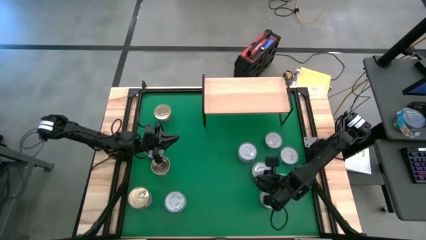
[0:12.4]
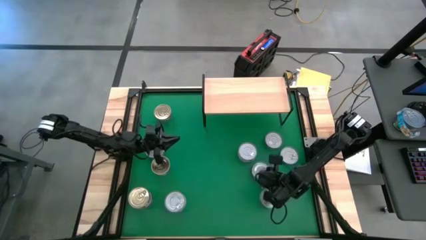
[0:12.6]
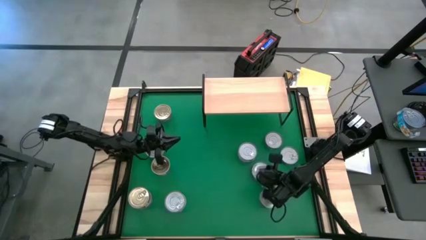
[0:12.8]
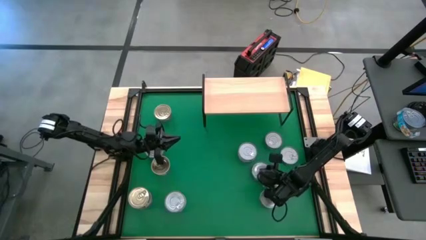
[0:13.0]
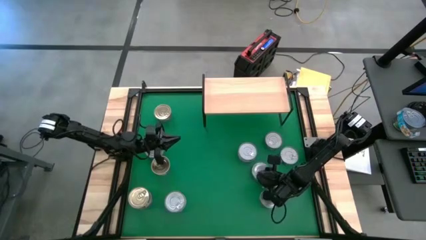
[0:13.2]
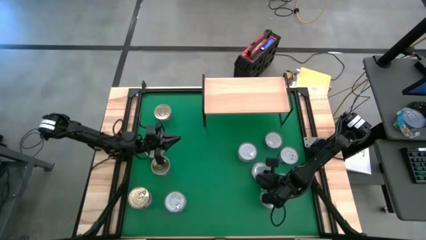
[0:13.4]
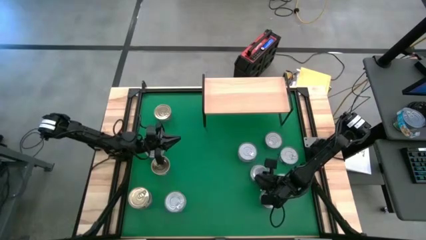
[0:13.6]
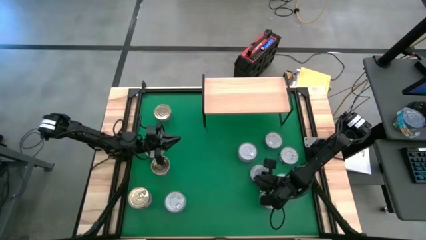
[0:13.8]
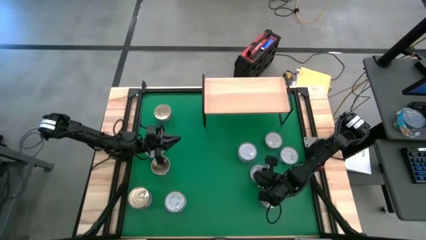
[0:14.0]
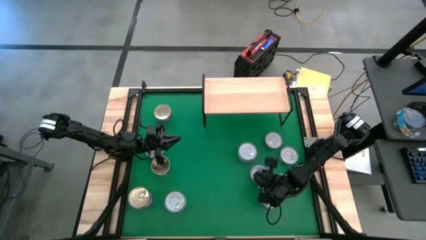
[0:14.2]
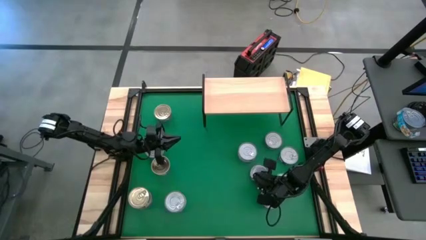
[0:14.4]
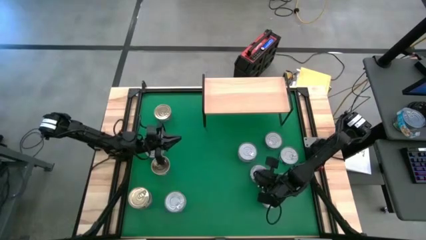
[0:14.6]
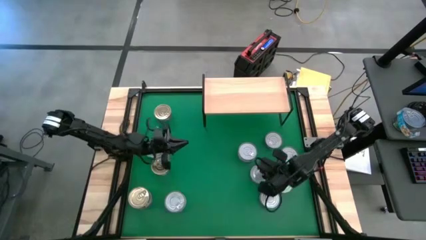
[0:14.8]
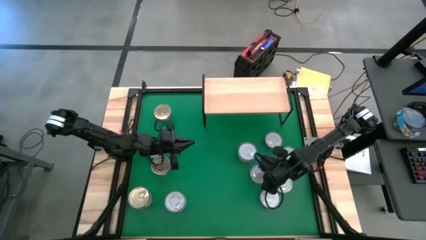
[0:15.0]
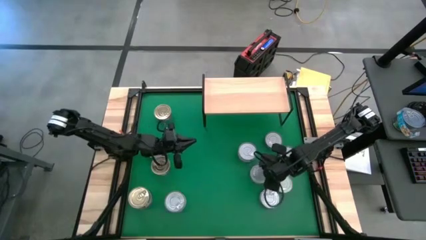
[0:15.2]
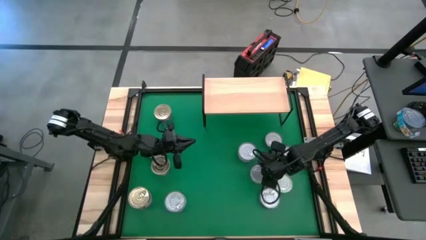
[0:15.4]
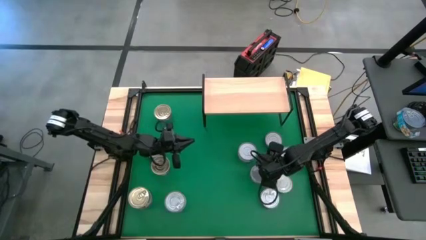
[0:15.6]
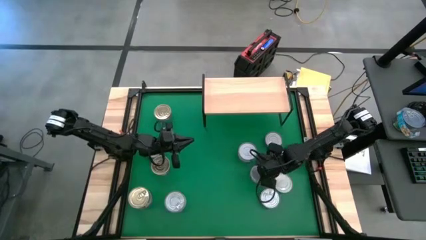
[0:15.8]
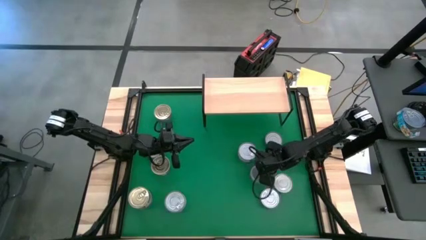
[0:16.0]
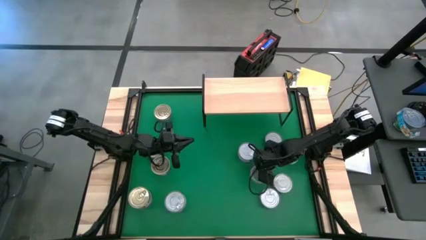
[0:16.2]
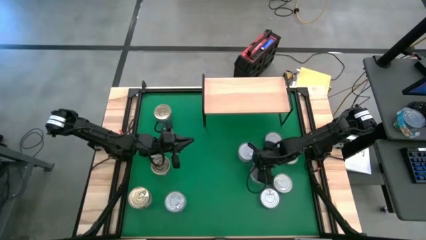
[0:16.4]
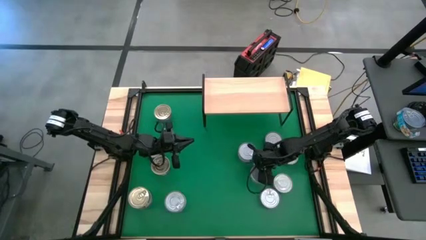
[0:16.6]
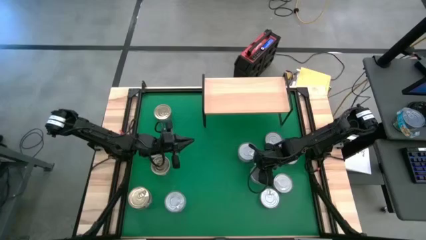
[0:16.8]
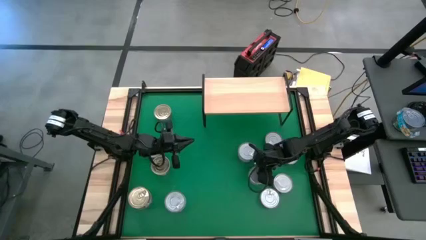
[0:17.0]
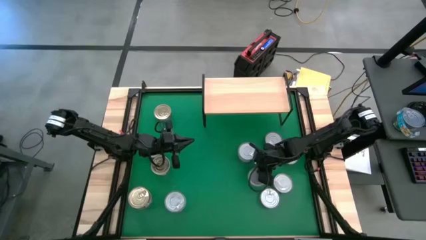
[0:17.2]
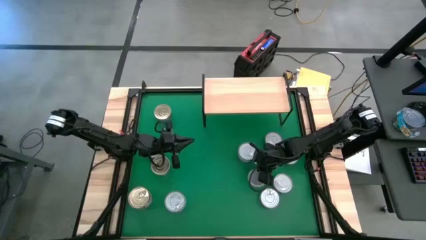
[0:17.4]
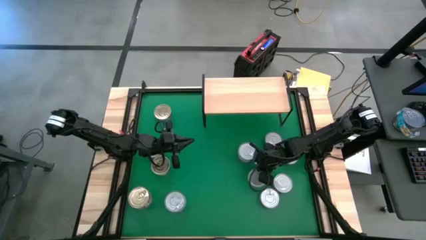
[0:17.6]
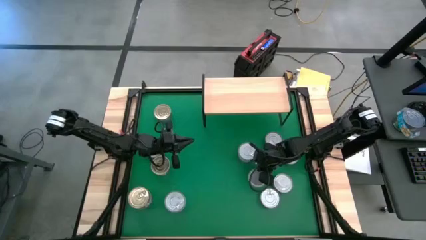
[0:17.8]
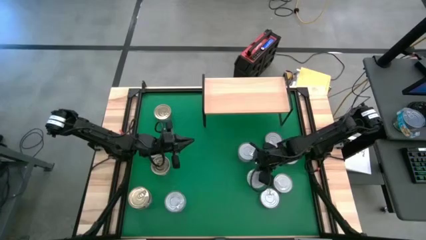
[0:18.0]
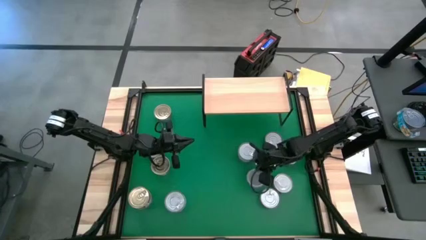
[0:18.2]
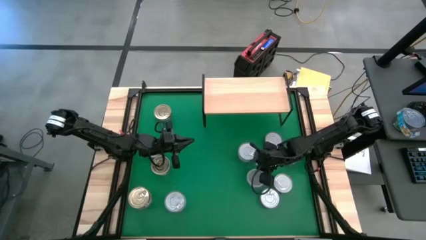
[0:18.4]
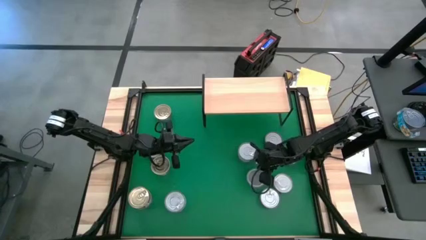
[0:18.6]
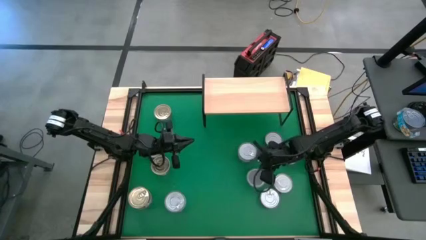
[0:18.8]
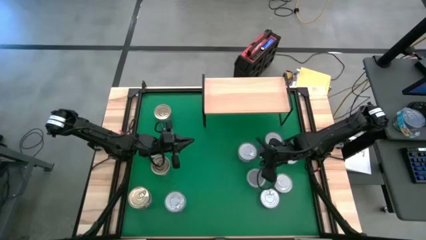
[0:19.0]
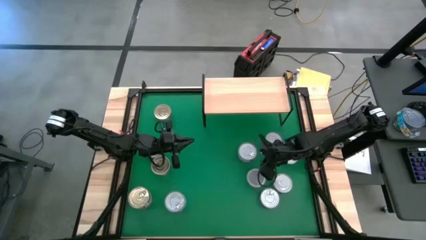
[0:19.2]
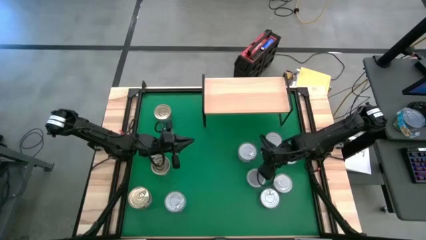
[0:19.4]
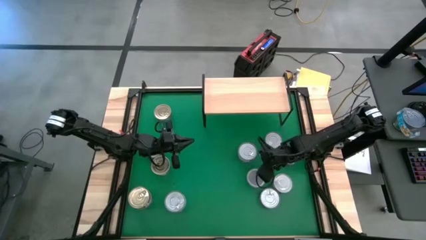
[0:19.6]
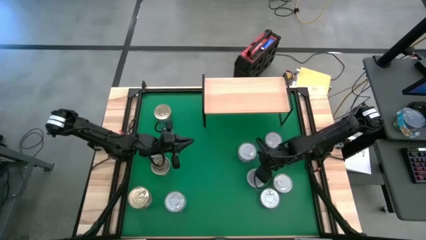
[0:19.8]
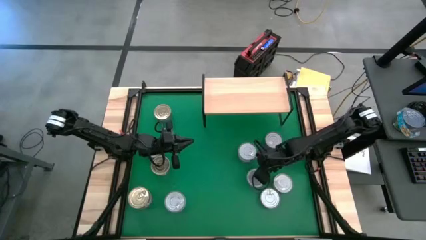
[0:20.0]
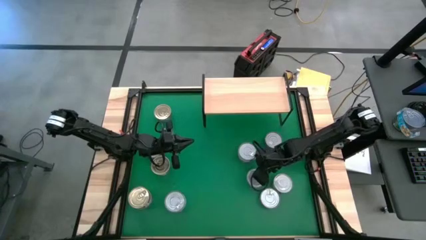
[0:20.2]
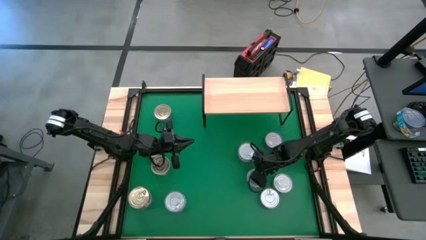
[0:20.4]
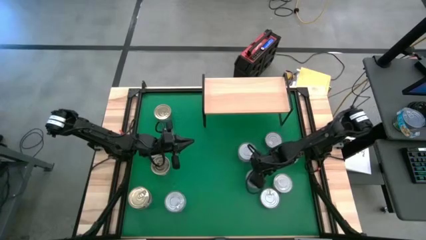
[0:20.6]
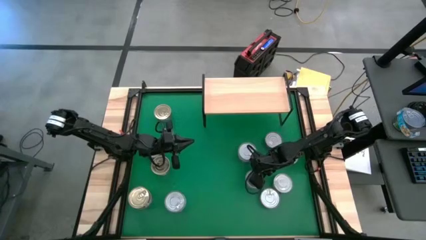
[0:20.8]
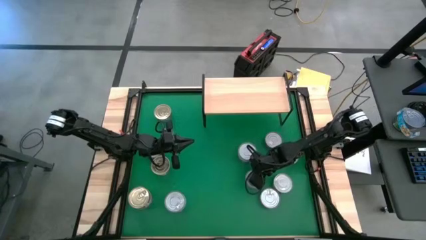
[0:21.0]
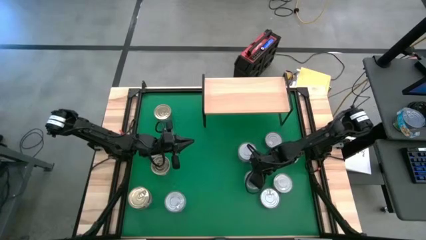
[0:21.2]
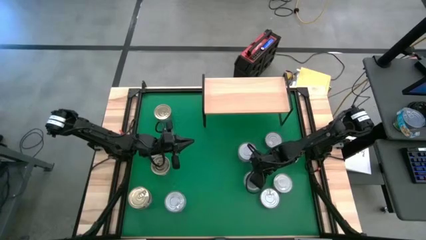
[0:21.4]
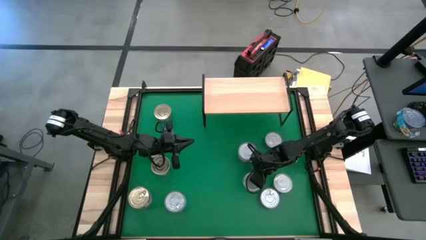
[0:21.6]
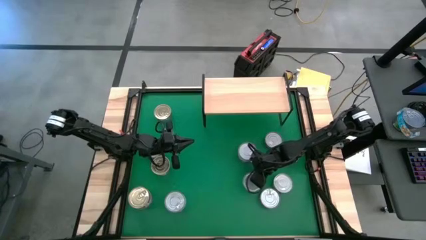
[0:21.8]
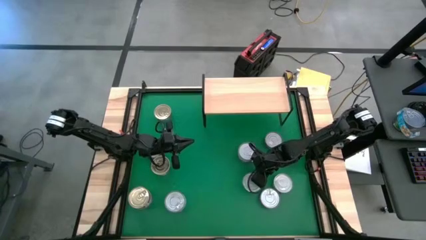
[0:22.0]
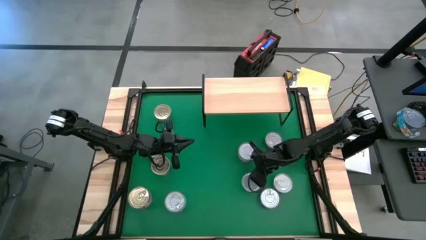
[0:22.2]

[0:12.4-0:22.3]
Task: Stack canned seafood by type on shelf
Put the green tuna can on the shelf
